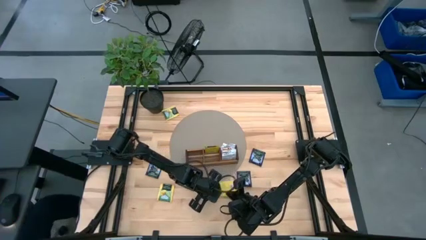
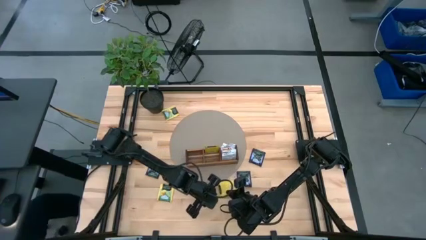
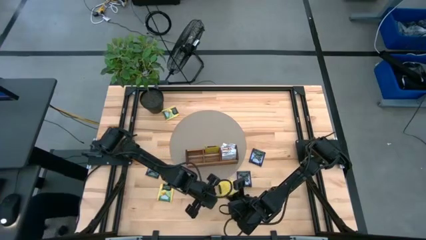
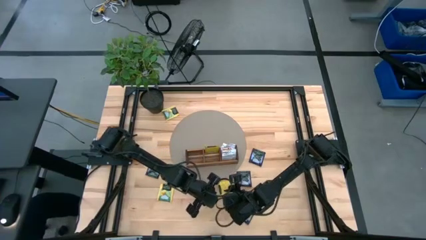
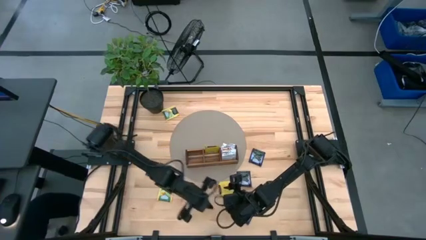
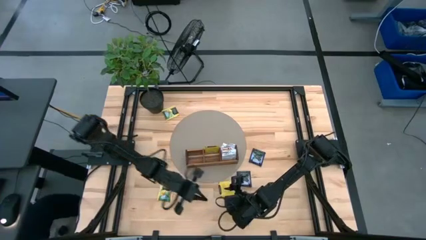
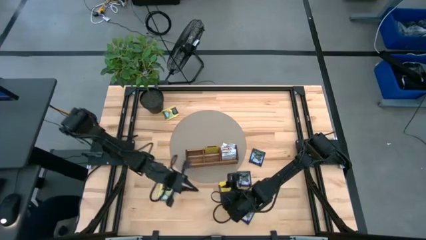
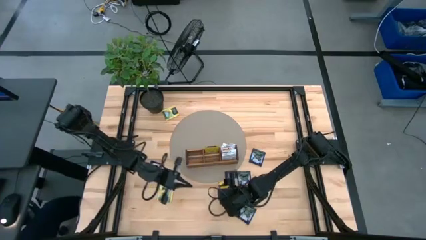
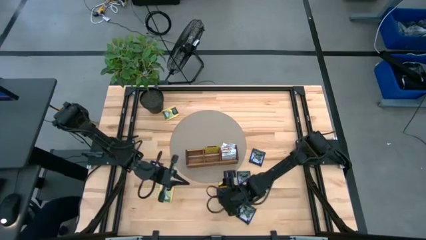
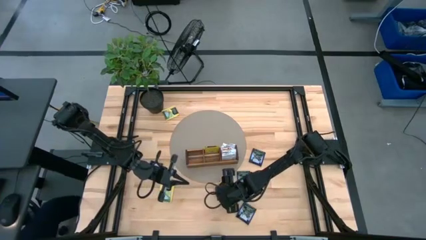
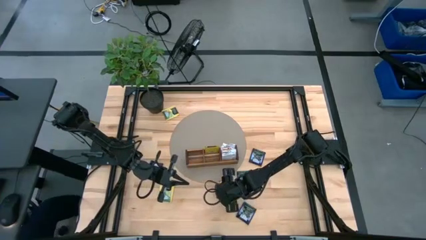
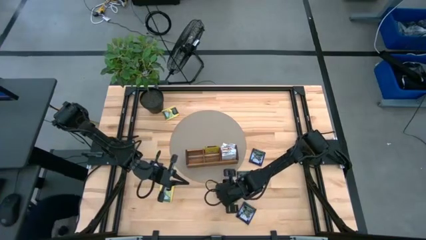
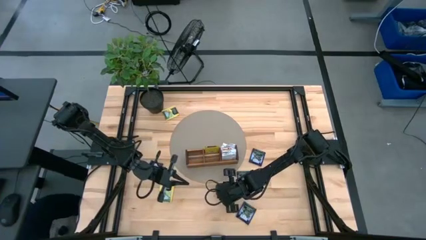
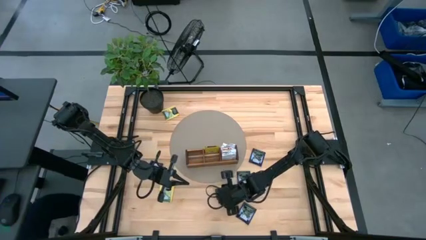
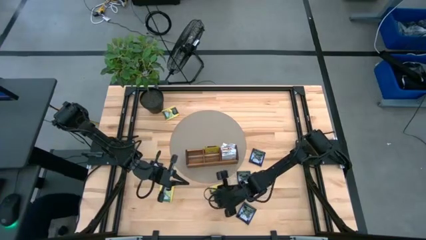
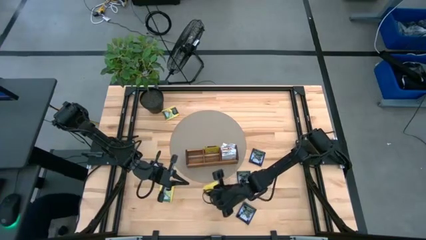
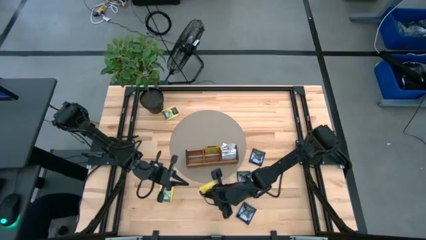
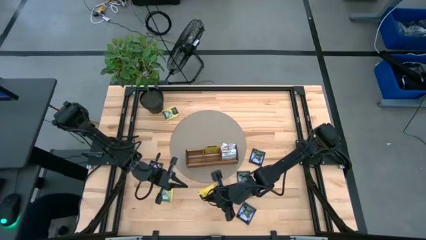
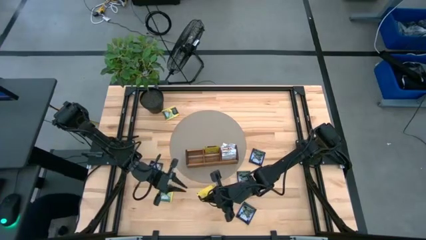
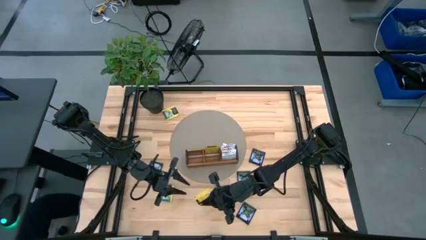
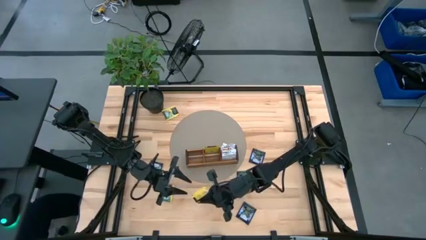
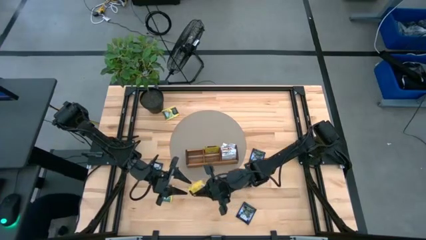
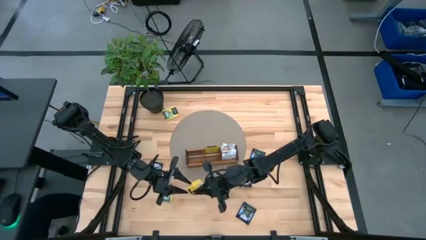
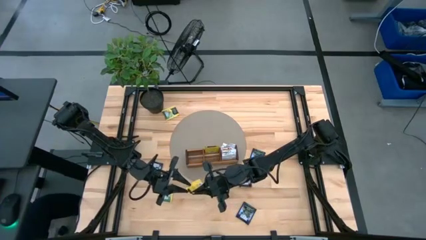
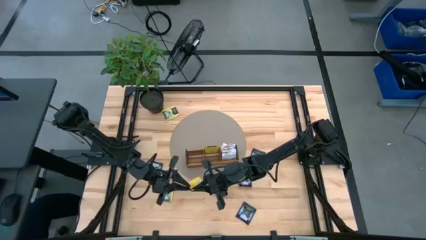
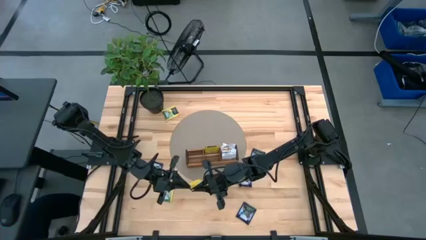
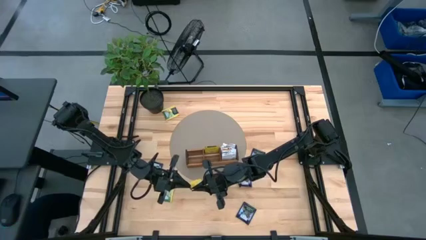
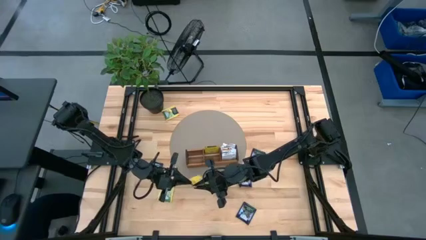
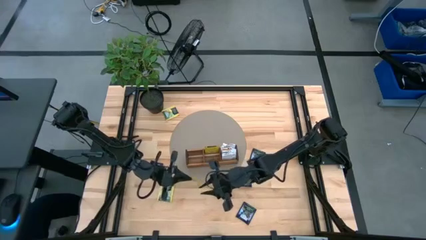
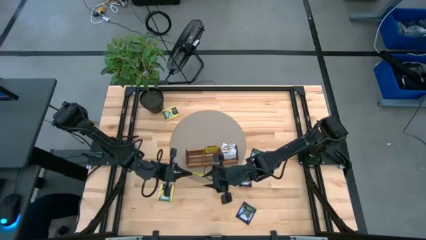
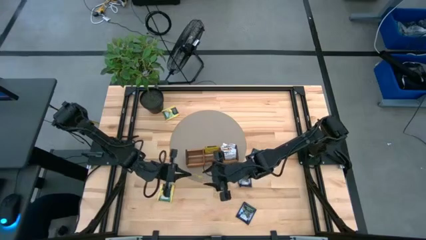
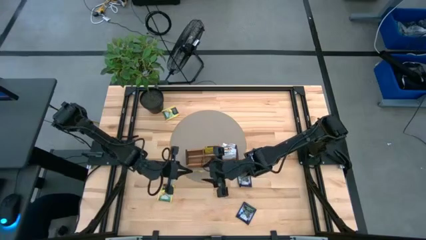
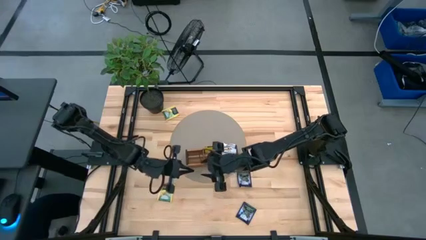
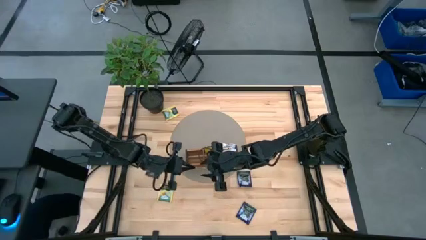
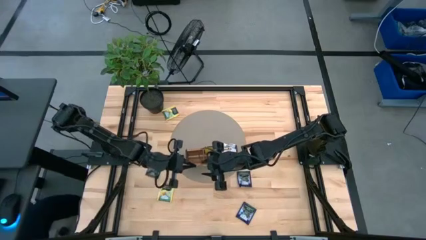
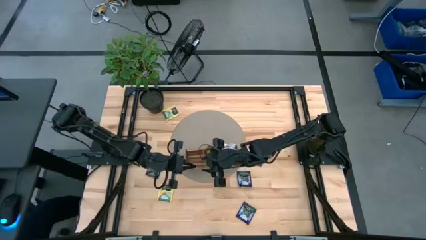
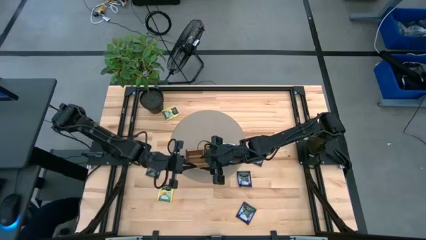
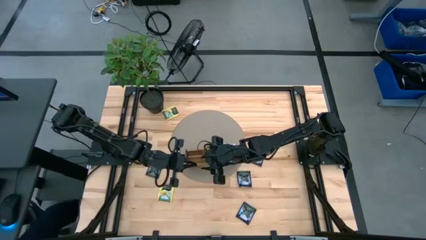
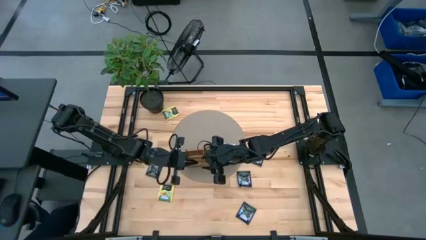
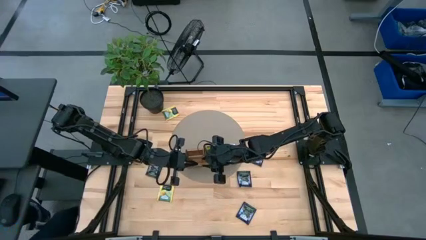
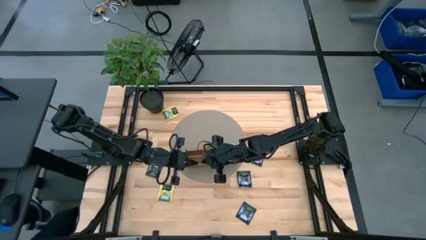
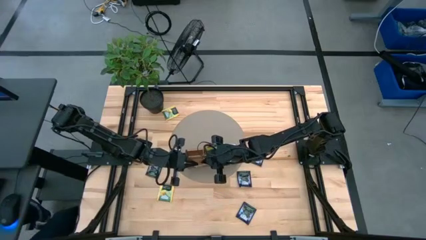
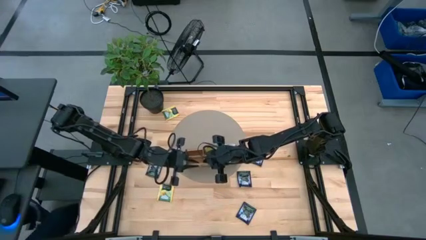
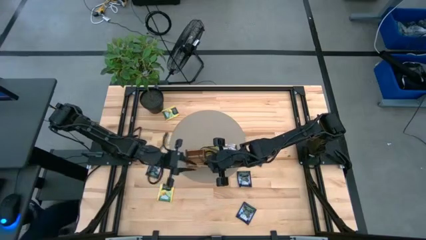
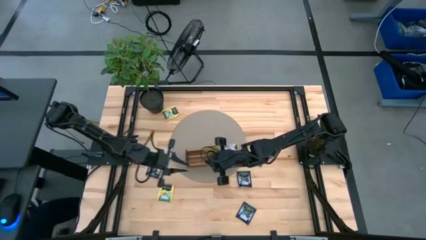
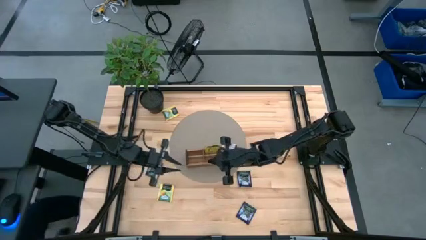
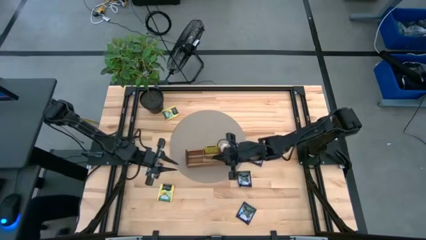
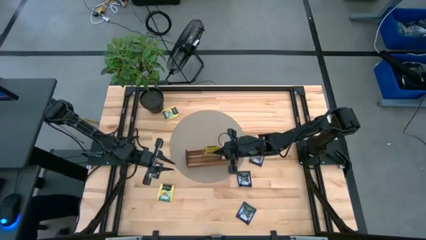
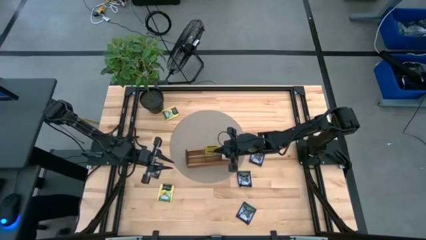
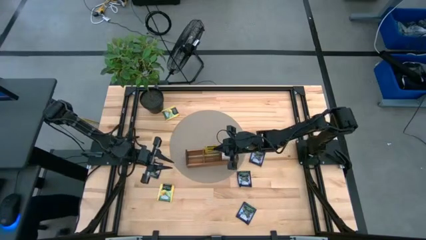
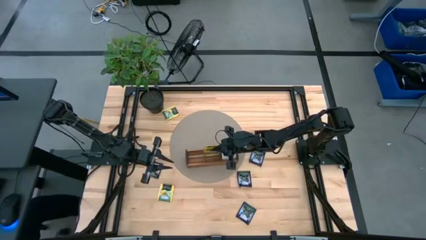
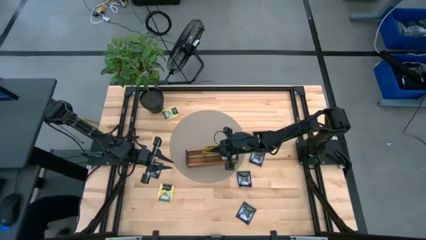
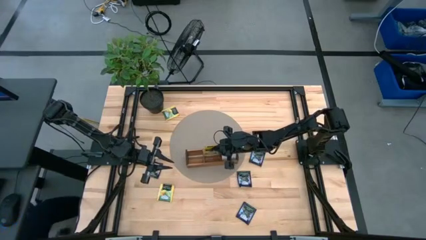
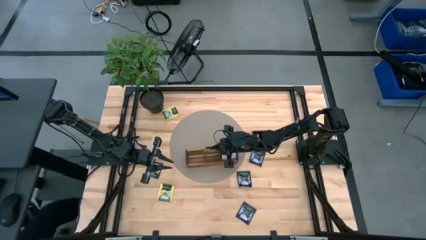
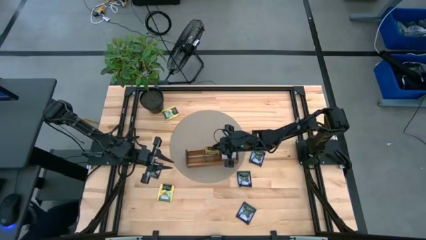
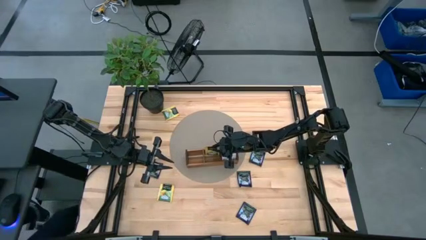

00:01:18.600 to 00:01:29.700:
Task: Pick & Place Tea
Put the yellow tea bag into the middle section of the wooden organizer

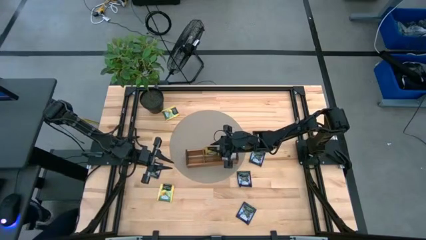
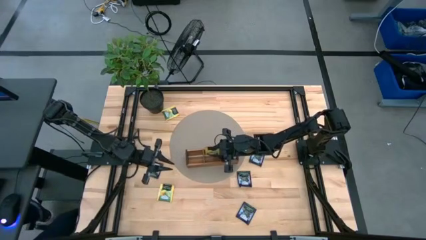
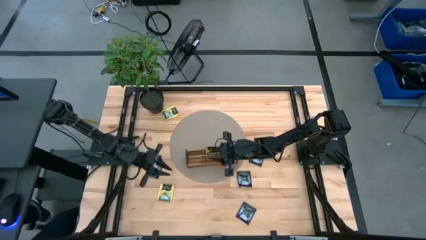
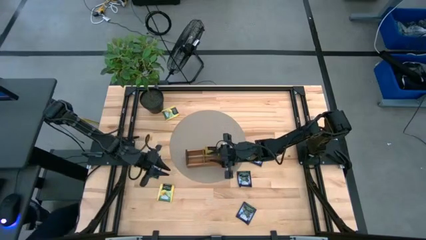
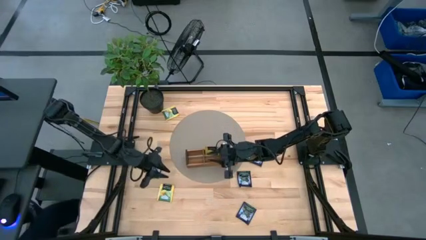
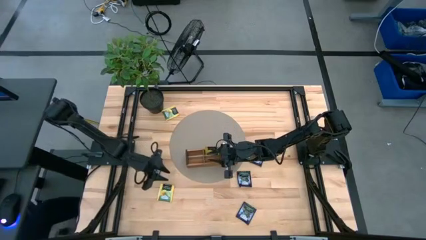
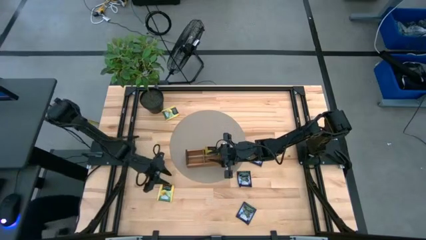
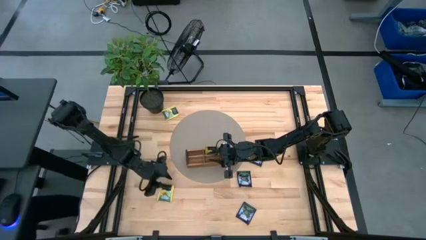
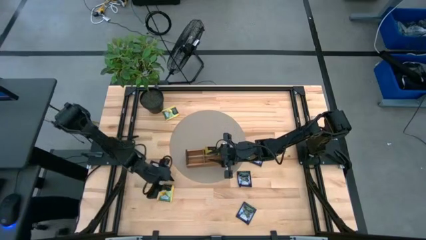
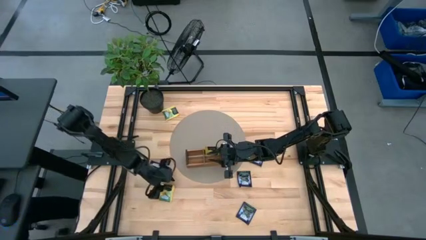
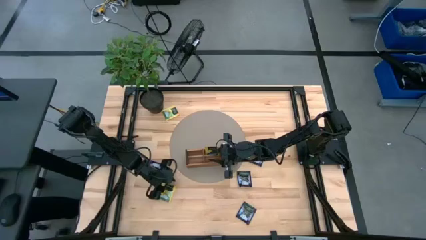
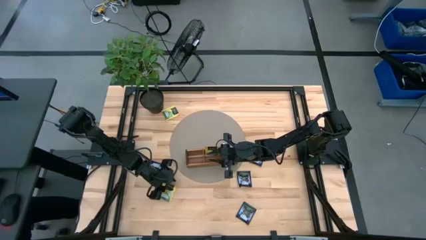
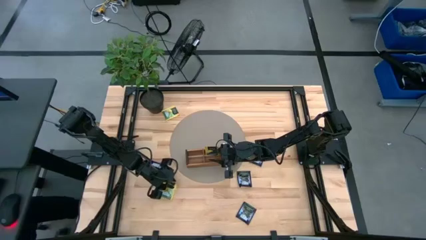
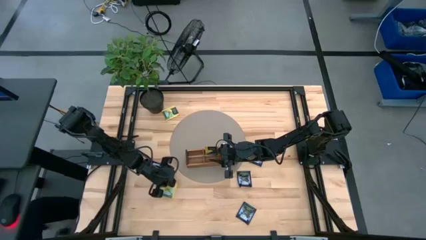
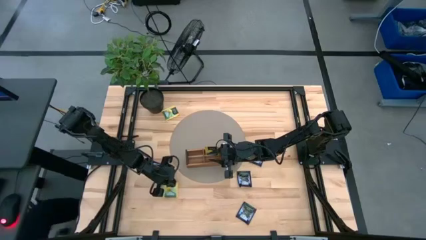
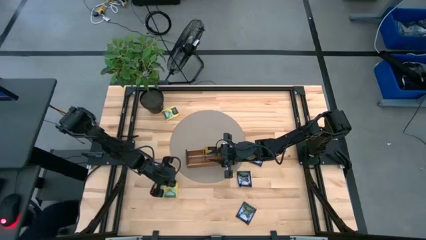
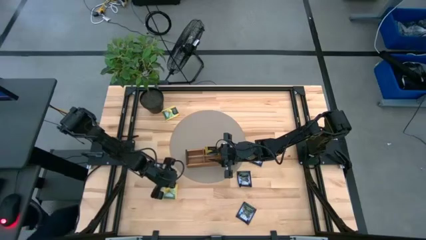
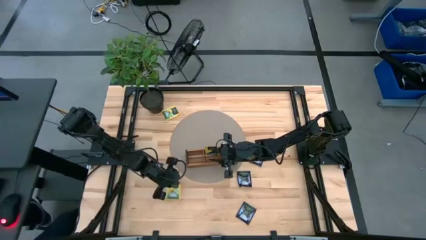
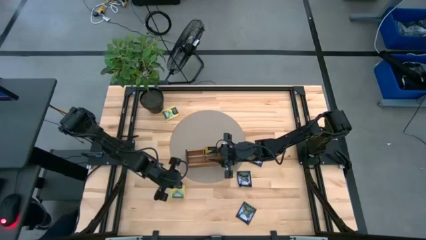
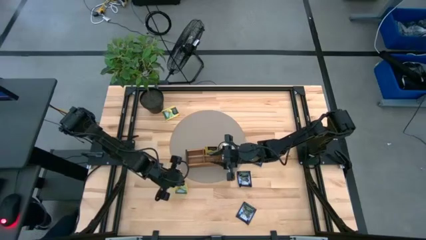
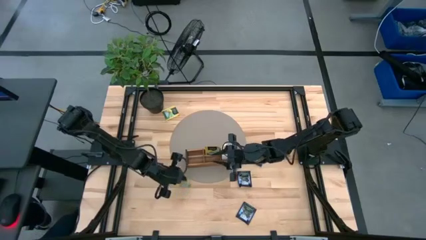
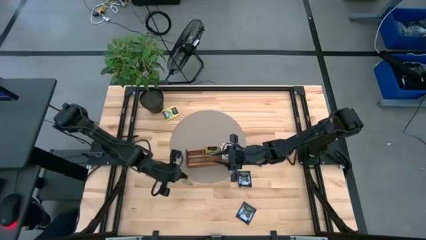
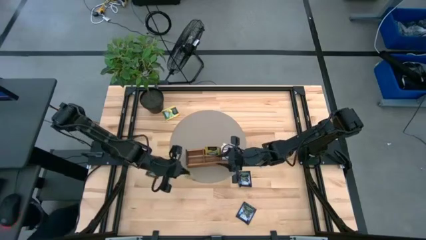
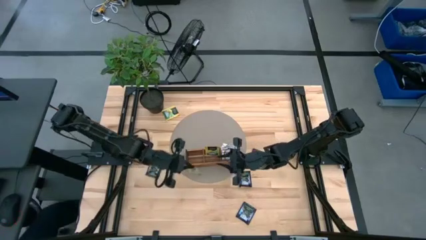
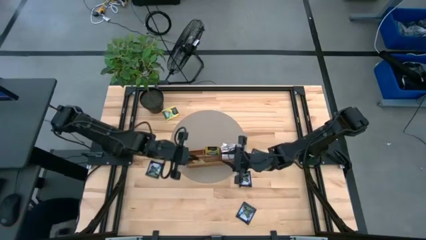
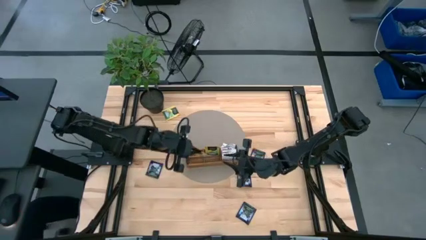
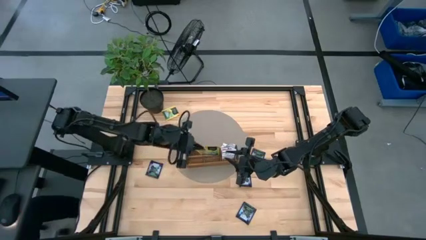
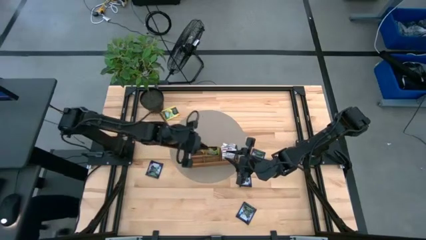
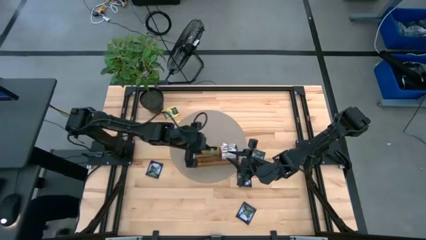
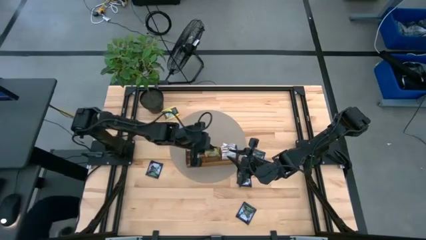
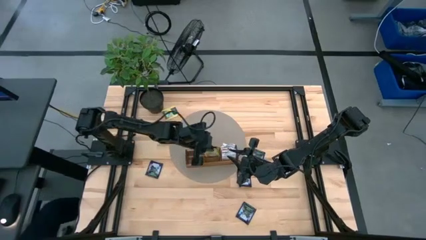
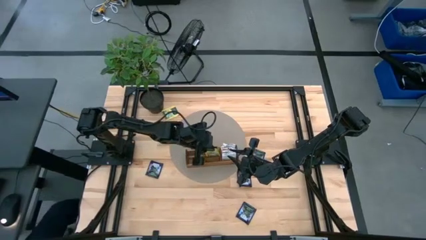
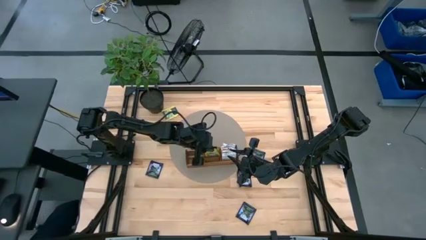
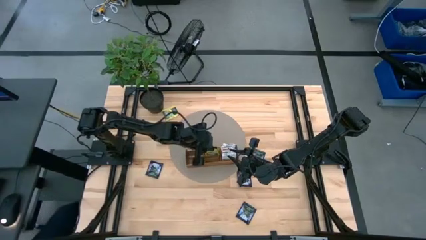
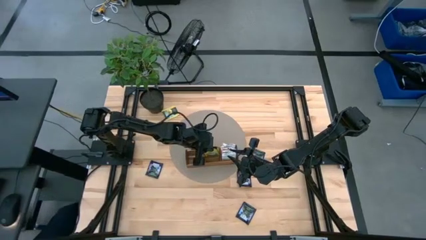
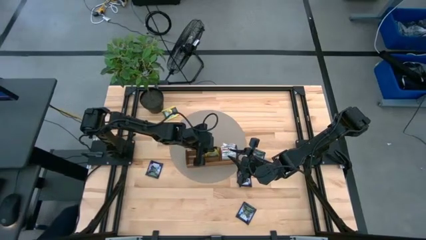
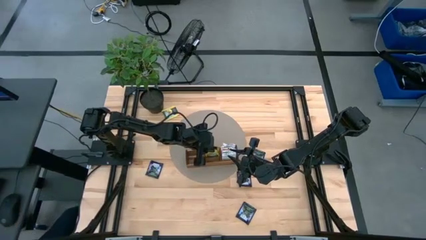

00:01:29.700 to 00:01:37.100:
Put the yellow tea bag into the middle section of the wooden organizer
